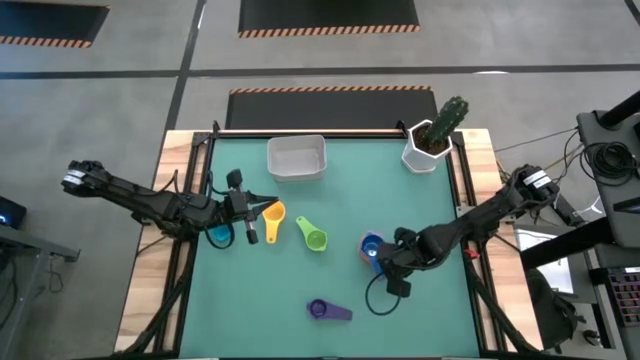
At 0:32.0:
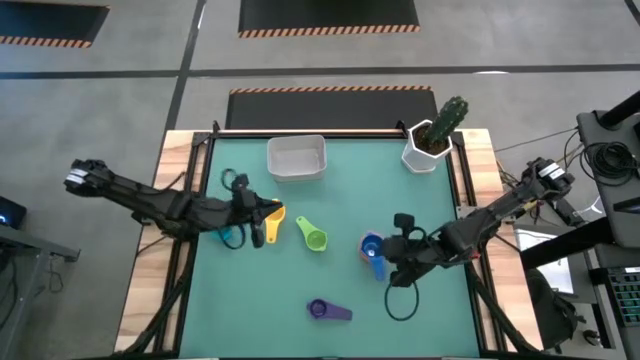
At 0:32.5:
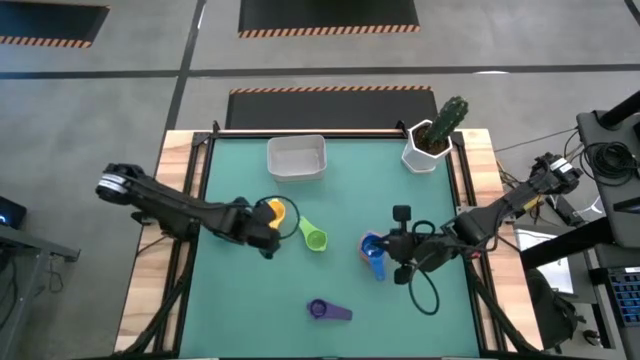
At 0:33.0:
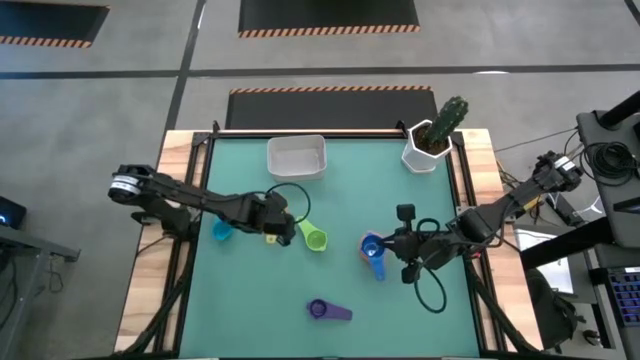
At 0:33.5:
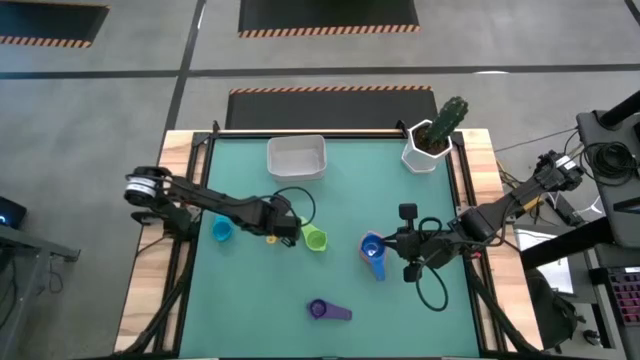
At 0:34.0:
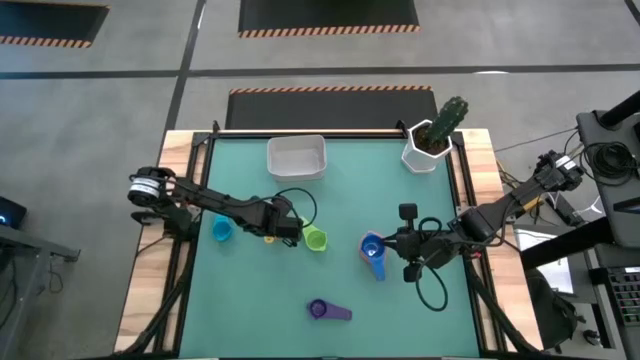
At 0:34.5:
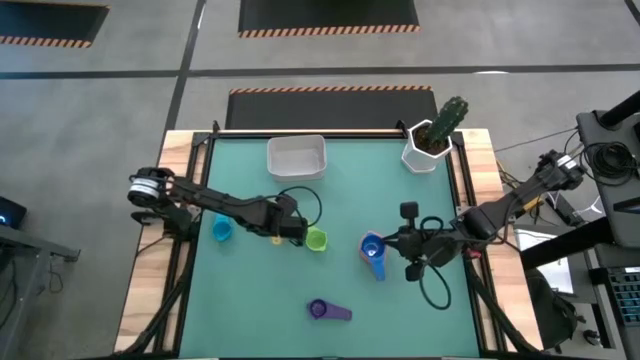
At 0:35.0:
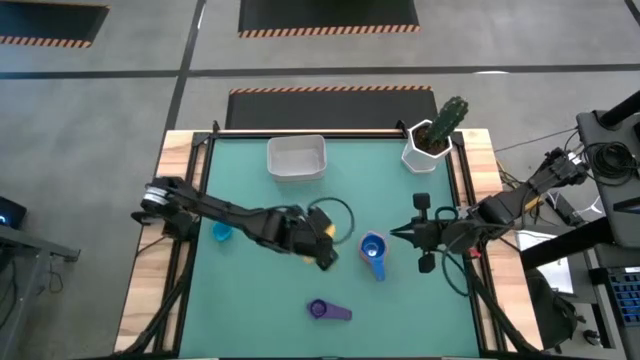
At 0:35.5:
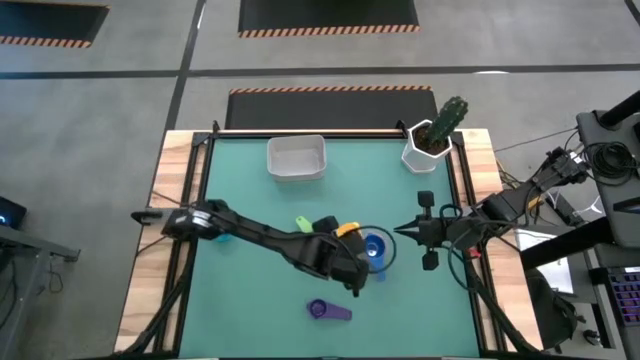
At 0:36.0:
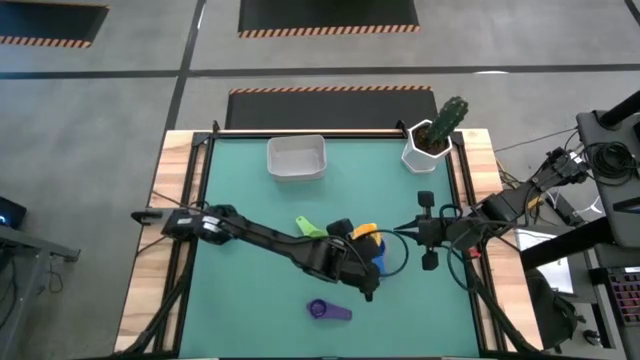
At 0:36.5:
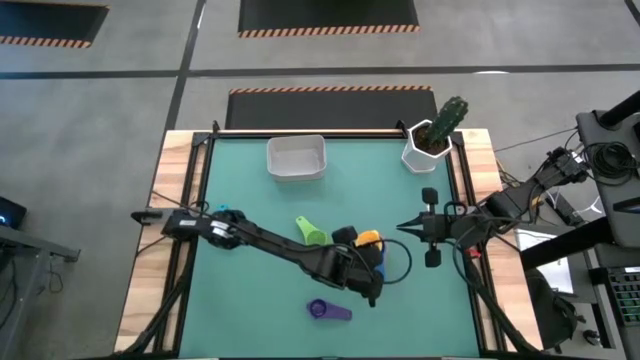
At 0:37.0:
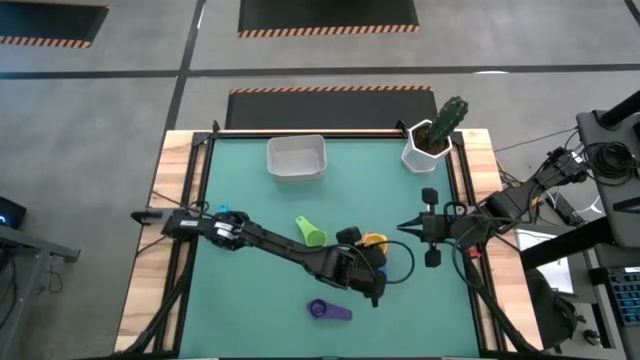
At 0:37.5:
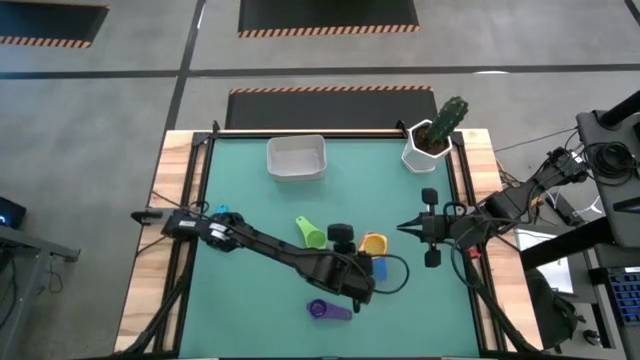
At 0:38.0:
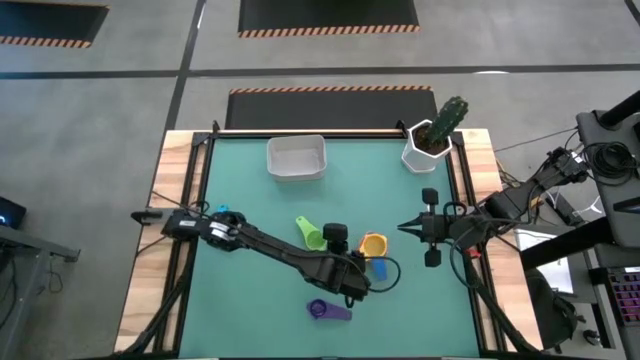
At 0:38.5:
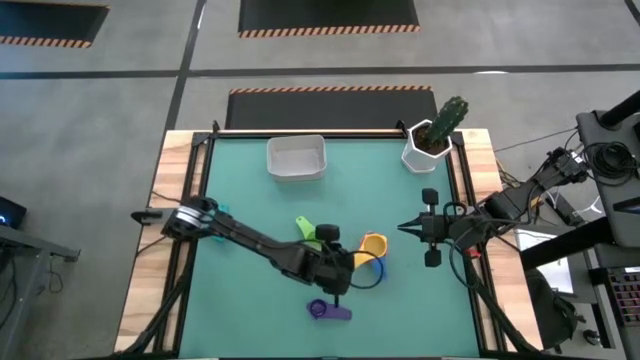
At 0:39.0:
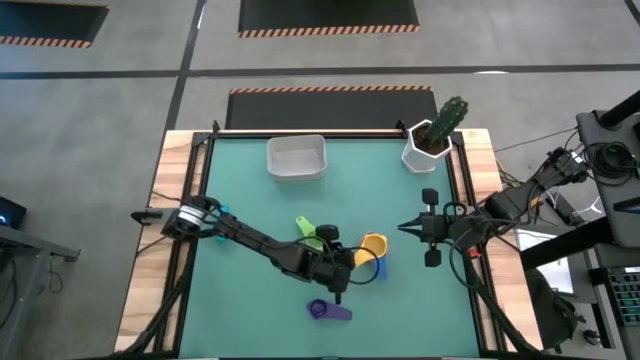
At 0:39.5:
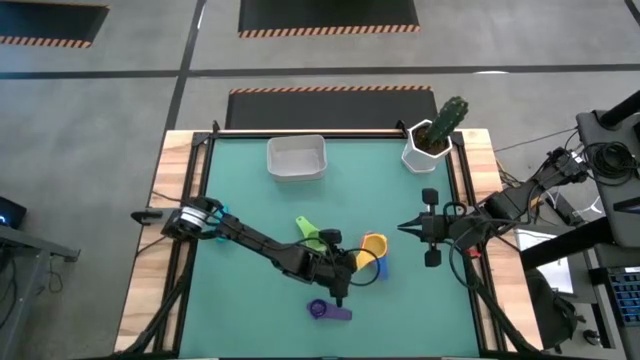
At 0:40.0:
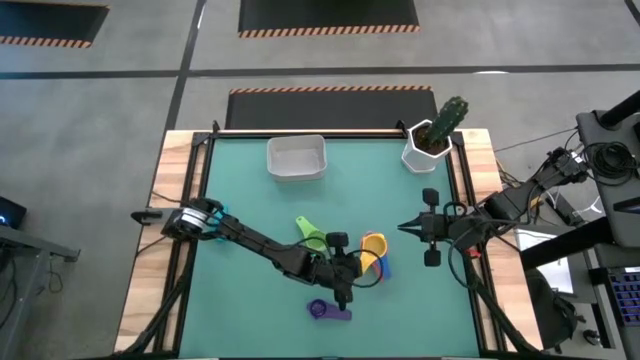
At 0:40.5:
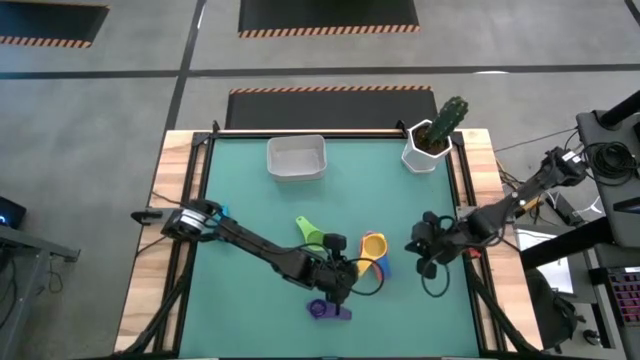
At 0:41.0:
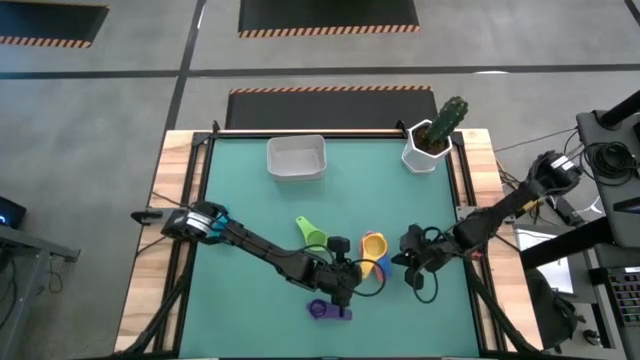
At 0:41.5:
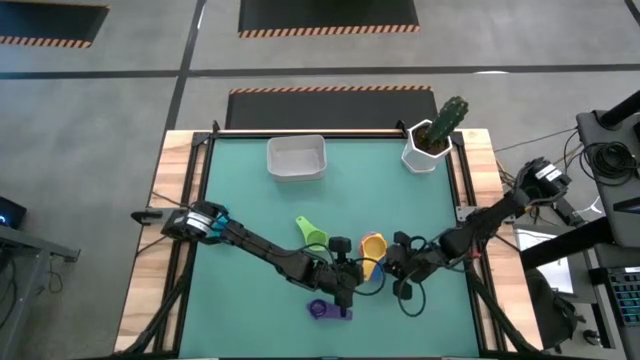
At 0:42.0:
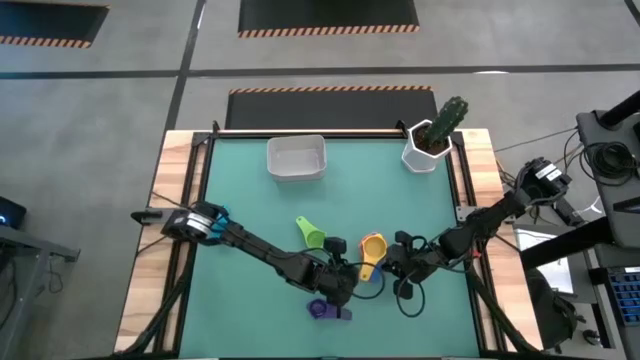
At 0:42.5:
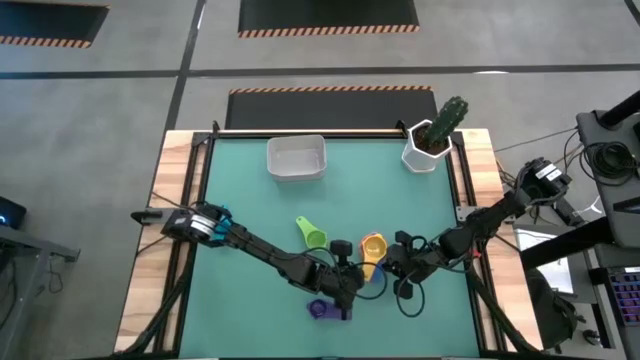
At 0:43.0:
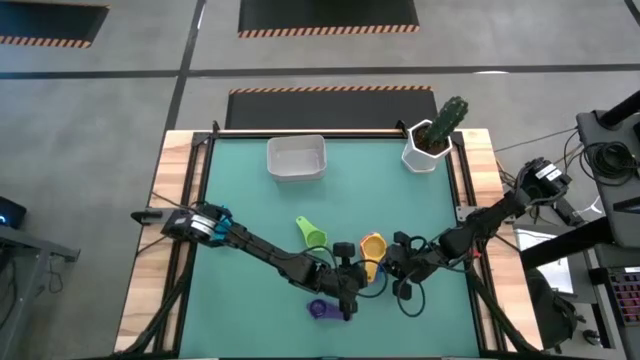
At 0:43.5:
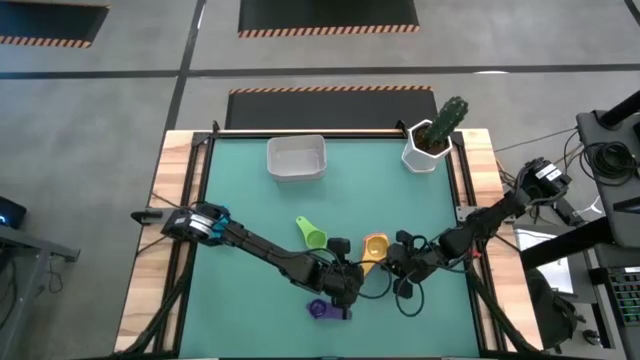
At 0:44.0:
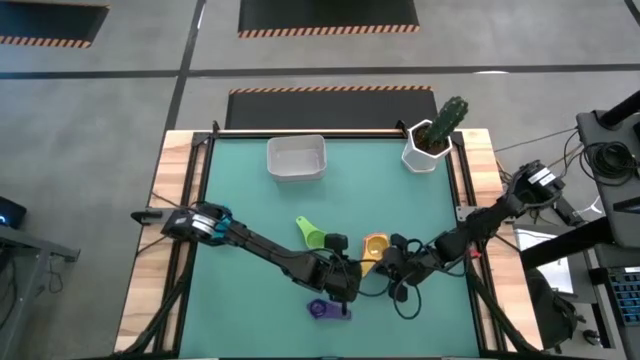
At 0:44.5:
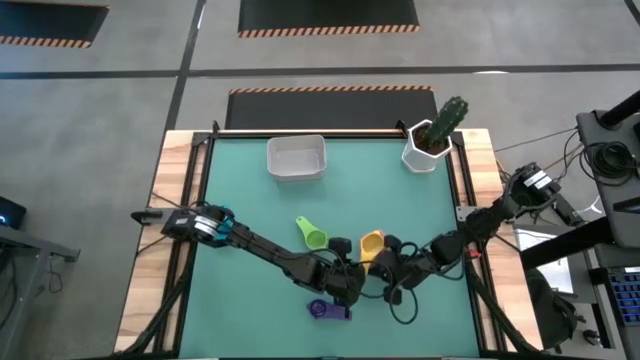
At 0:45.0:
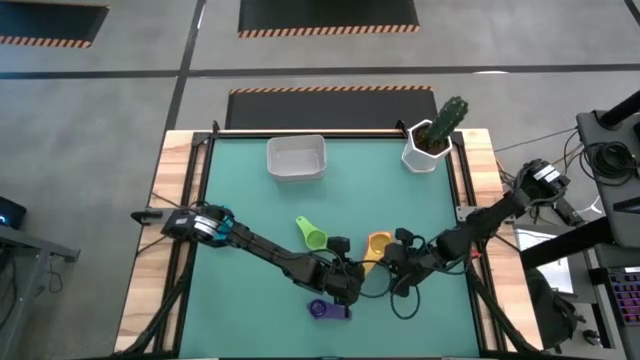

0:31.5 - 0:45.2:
Task: Nest measuring cups in basket
Stack the yellow measuring cup on top of the blue measuring cup

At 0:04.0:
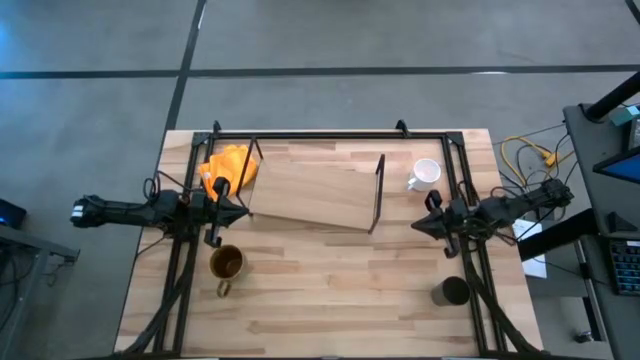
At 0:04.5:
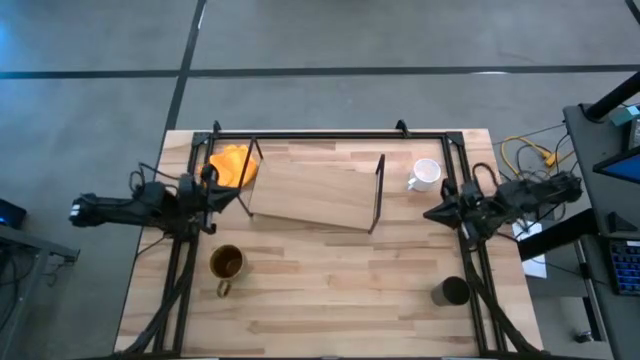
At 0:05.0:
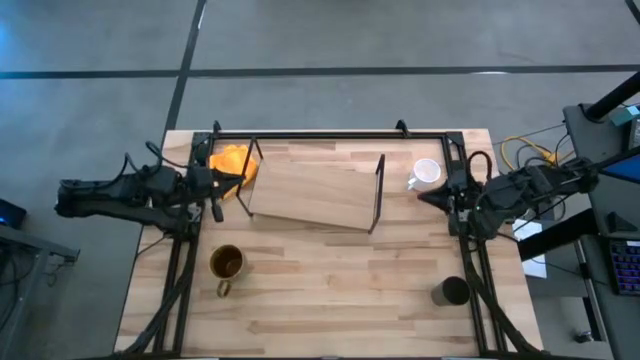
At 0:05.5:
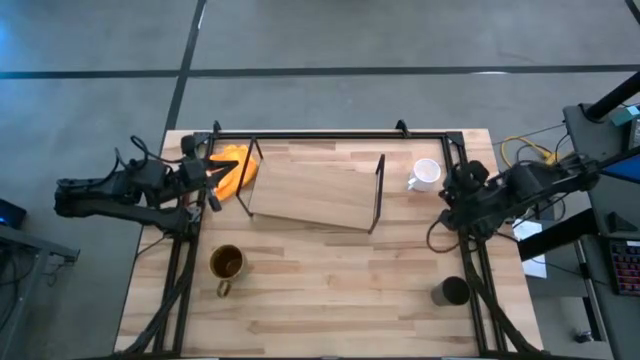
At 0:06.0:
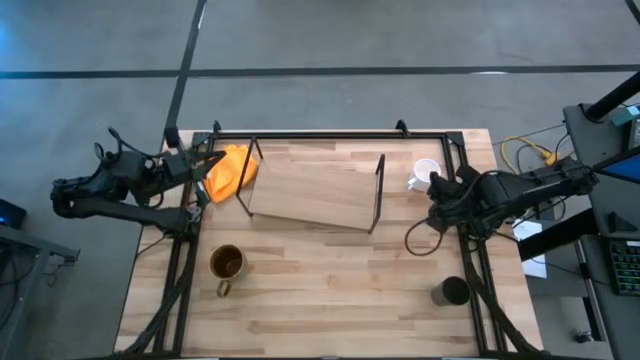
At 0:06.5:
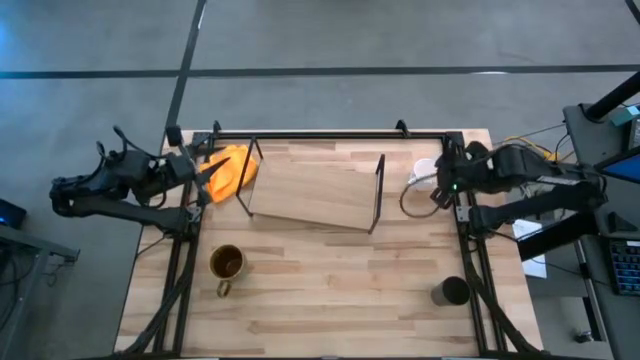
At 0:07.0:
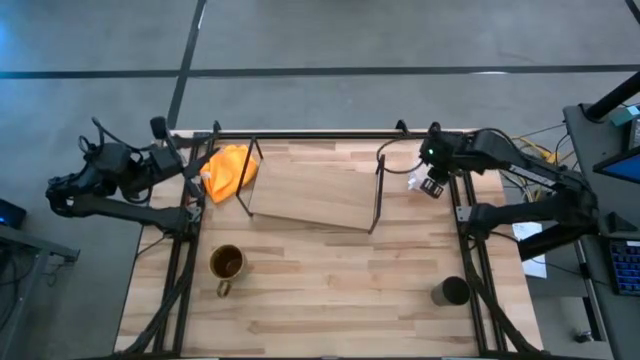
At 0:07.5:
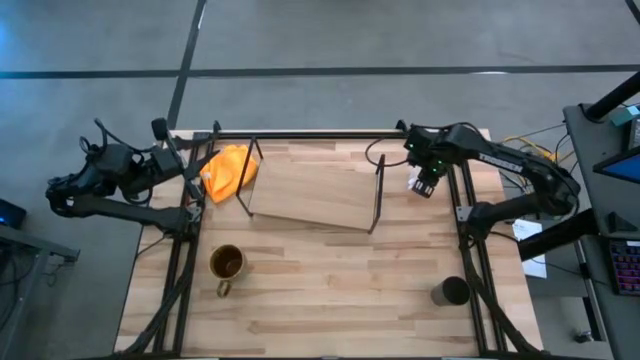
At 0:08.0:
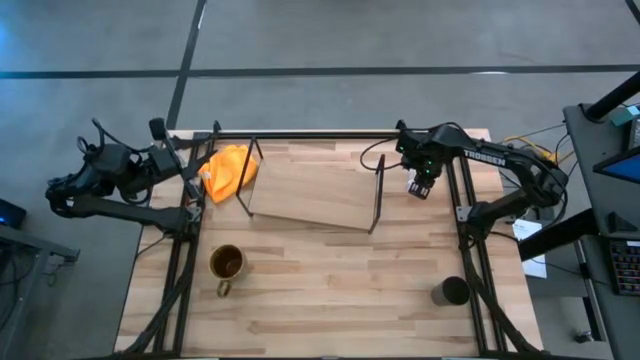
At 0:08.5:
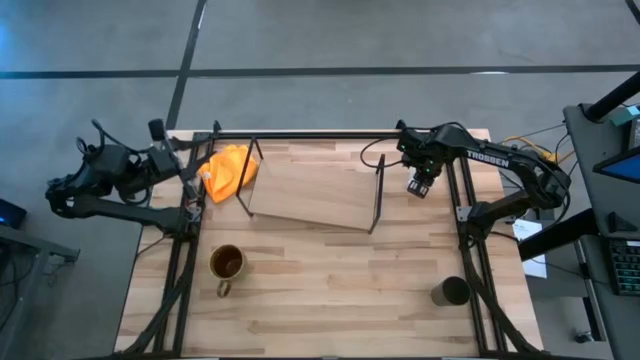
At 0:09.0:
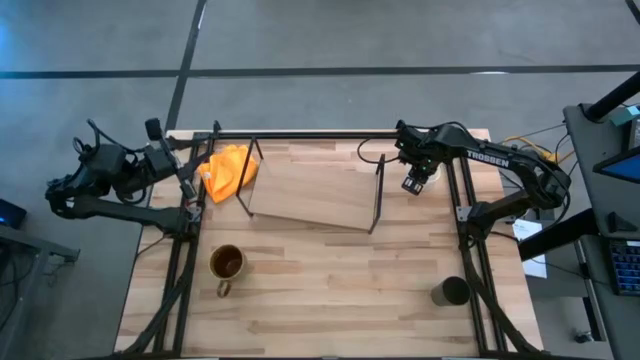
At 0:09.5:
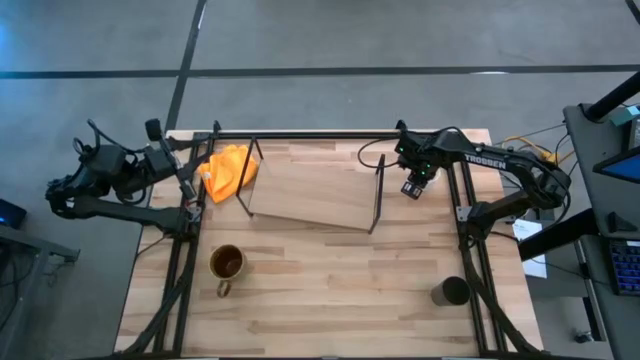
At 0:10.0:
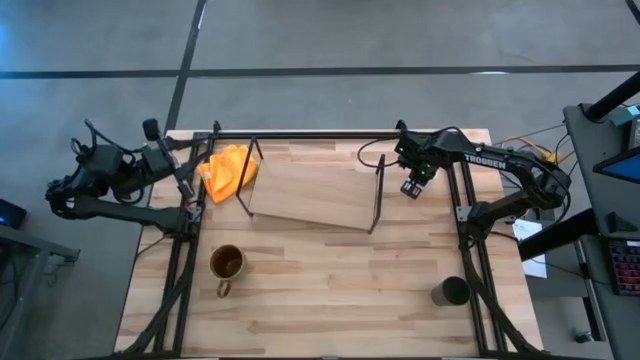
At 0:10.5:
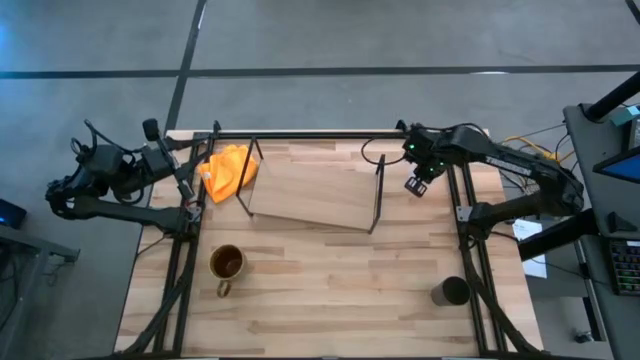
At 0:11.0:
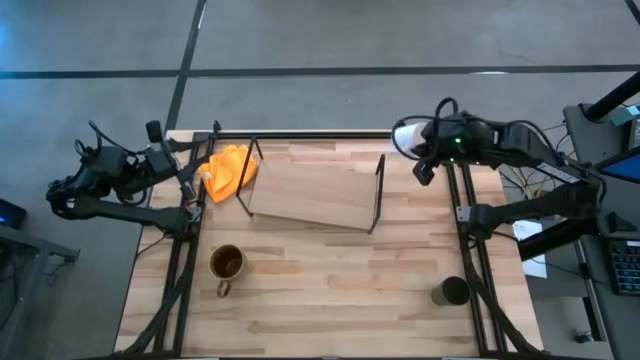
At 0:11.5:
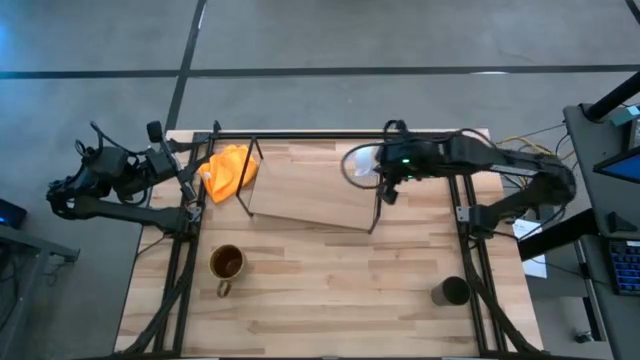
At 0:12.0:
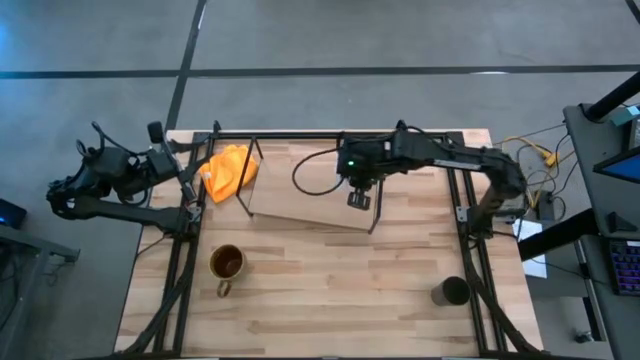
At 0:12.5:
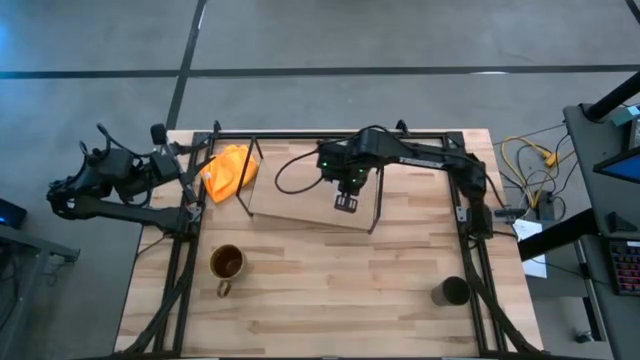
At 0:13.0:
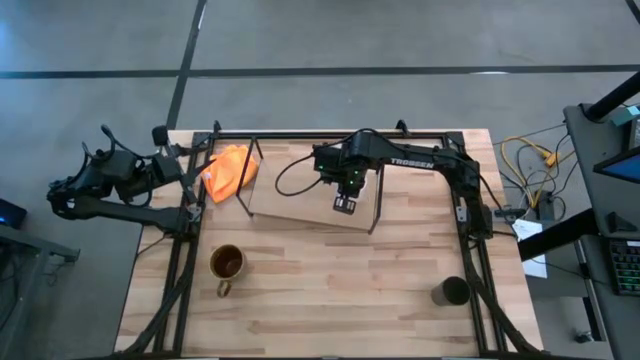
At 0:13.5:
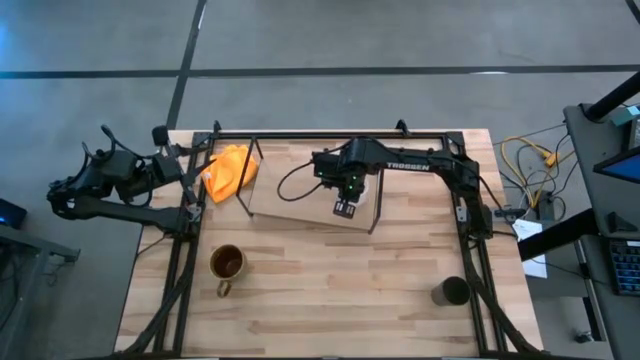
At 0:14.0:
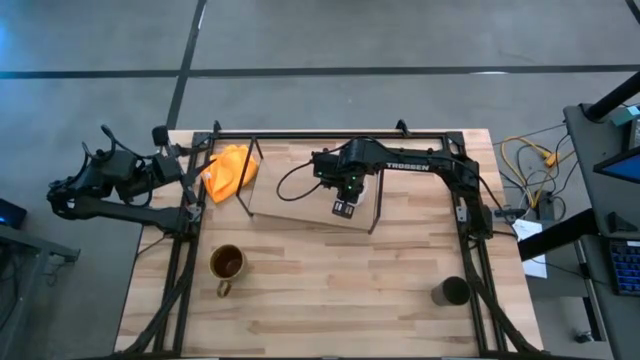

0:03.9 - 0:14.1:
Task: Stack small to large cups/mugs on shelf
Put the white mug on the shelf
